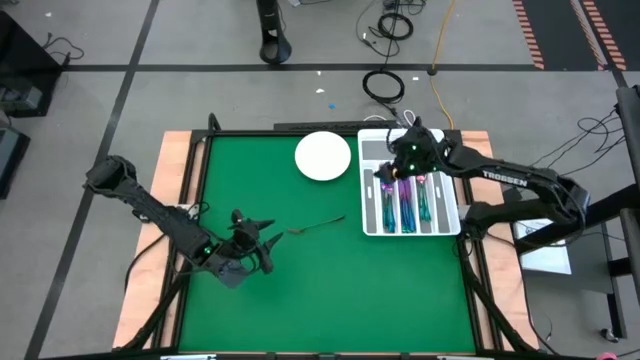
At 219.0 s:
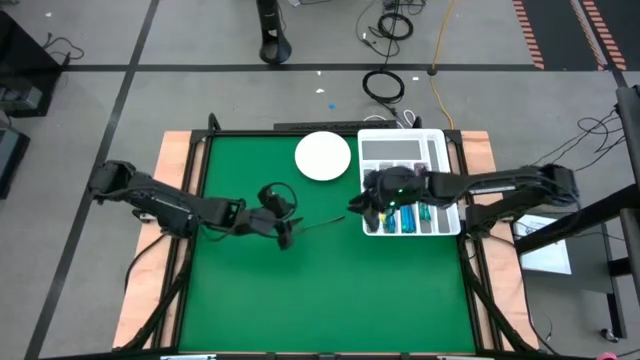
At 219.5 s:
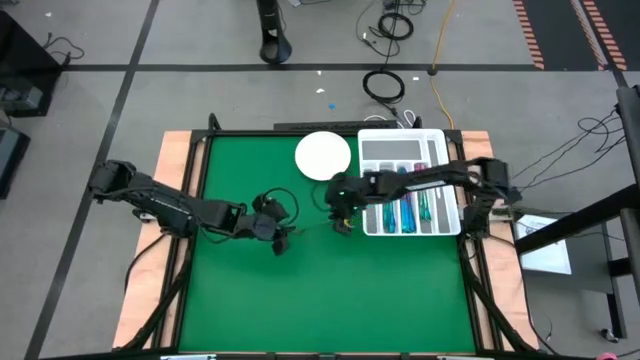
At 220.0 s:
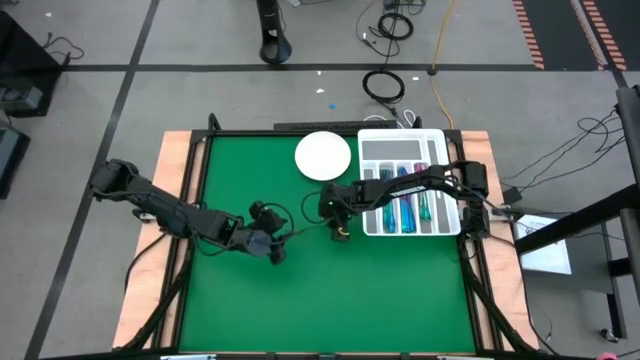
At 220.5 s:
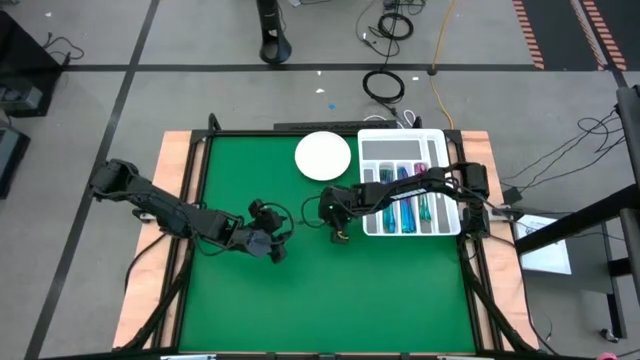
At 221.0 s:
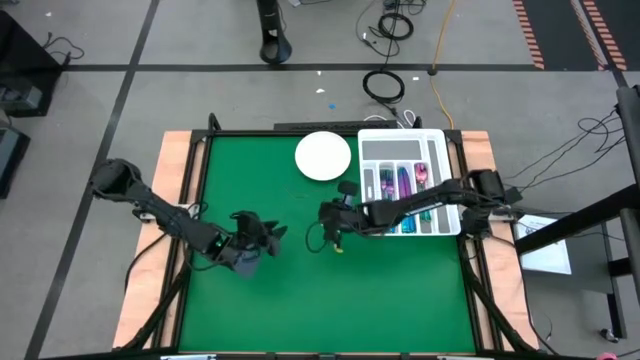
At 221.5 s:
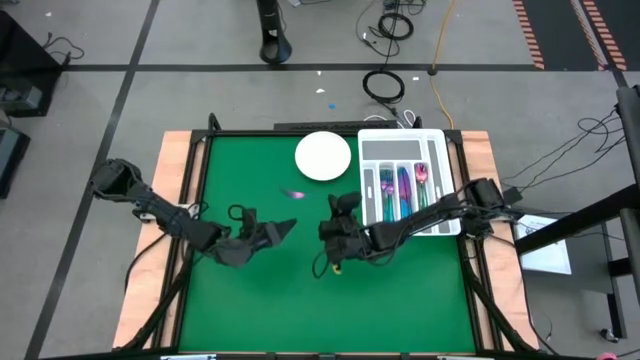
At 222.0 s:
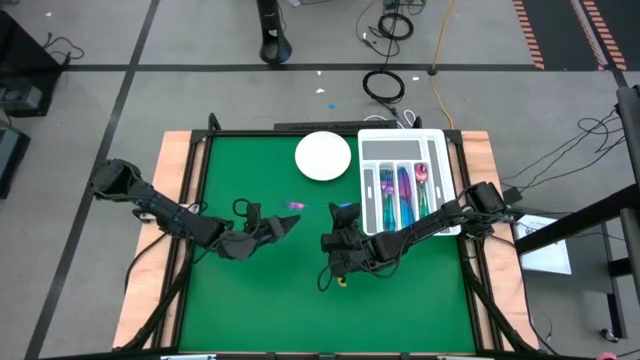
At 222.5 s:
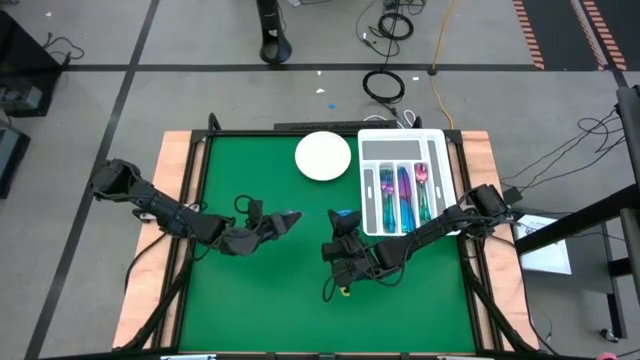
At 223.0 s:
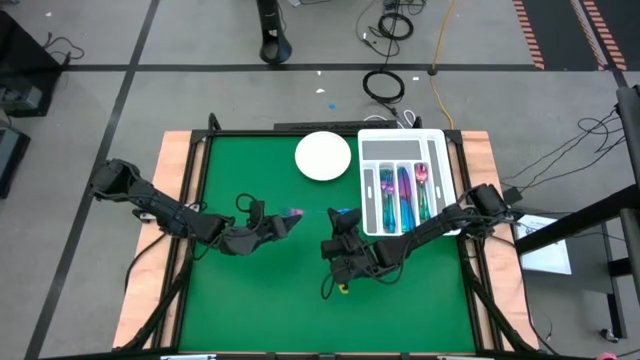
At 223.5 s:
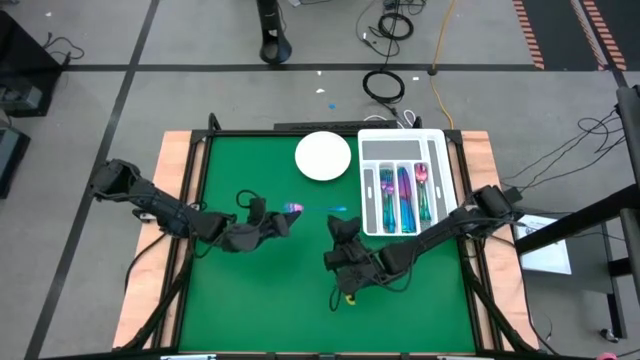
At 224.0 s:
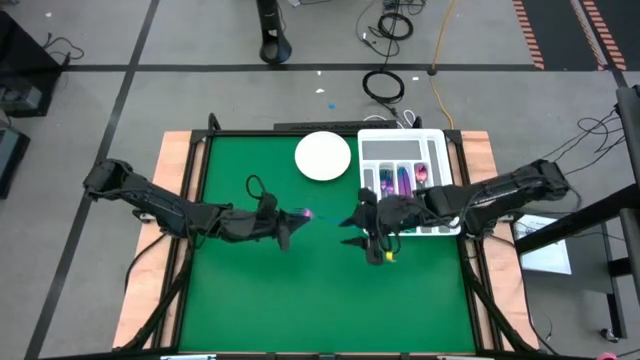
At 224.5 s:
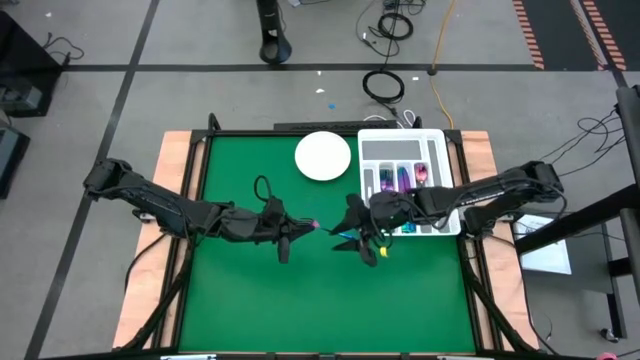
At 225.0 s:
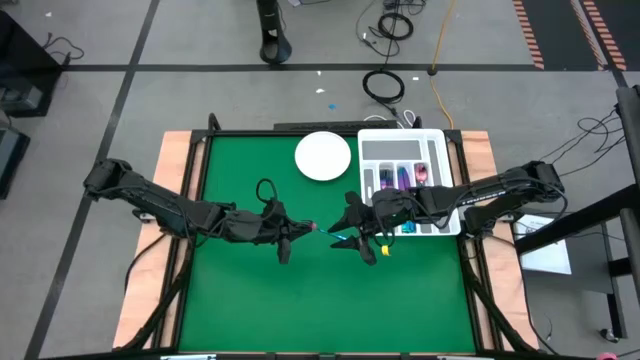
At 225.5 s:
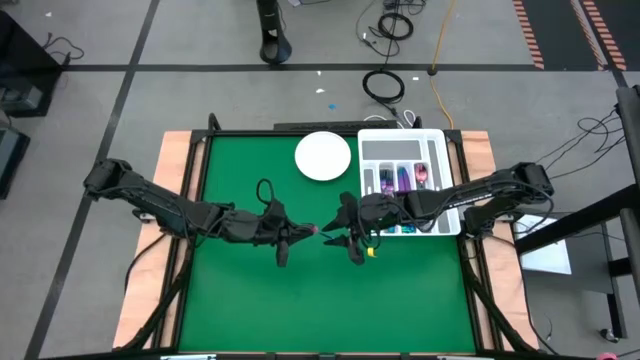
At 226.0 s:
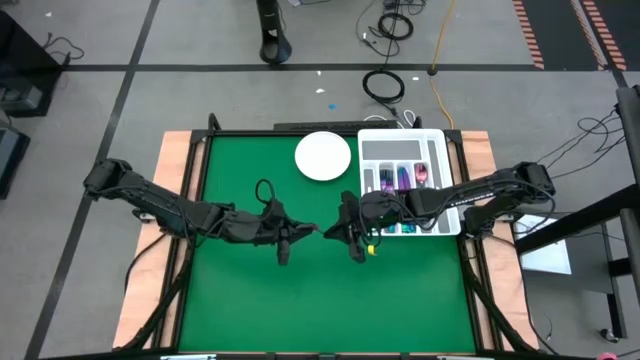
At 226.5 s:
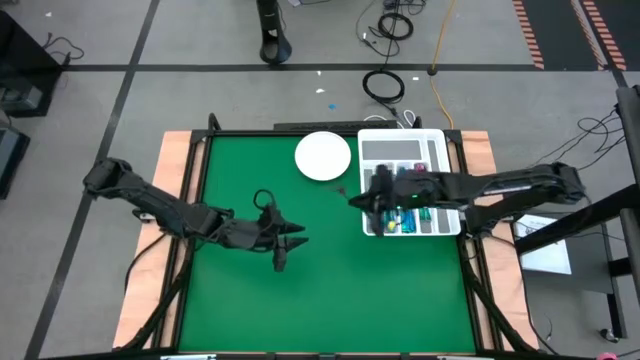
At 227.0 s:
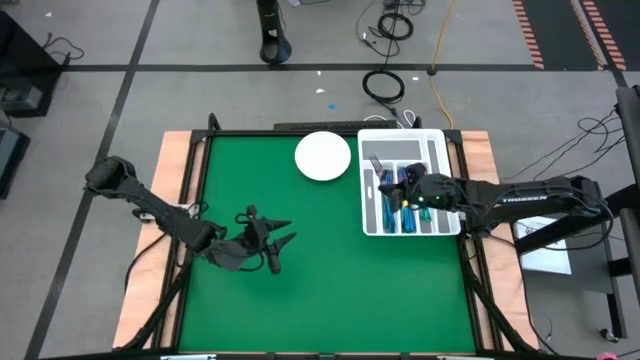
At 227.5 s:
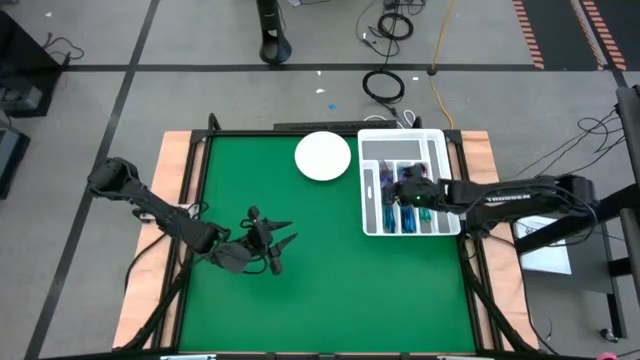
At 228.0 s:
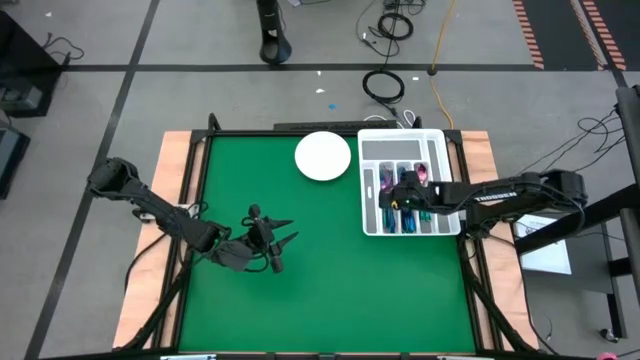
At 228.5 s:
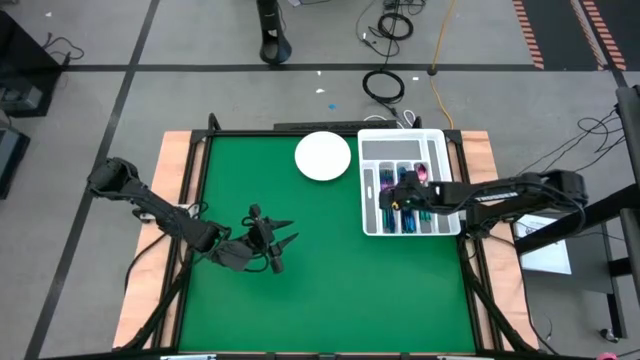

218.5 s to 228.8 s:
Task: Sort silverware
Put the iridescent fork into the white silverware tray

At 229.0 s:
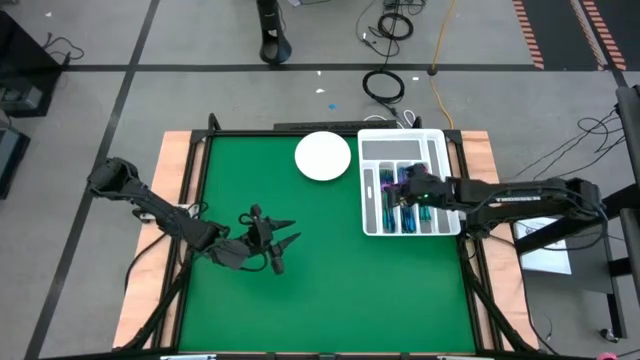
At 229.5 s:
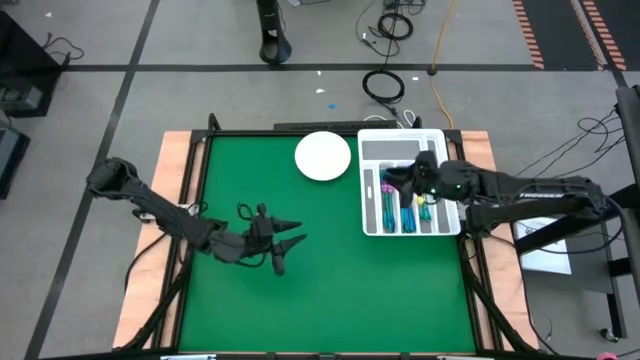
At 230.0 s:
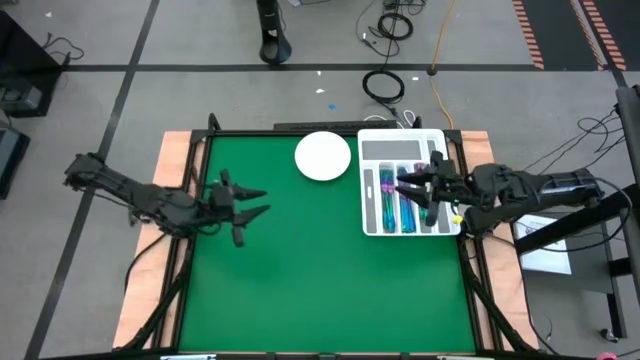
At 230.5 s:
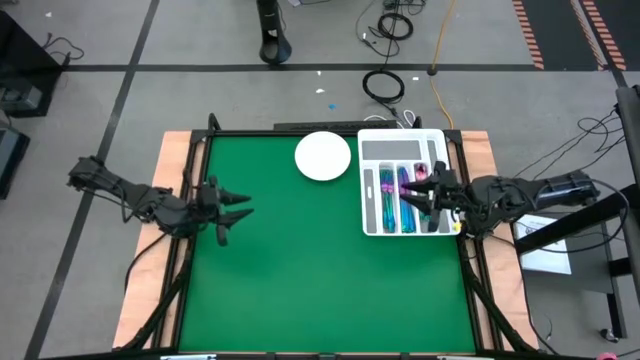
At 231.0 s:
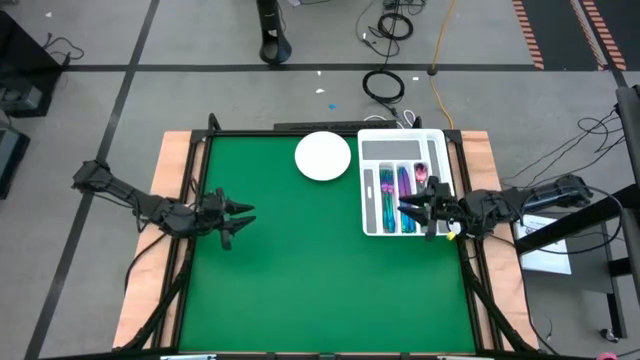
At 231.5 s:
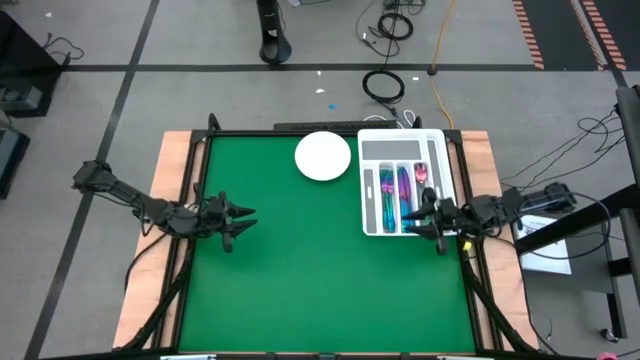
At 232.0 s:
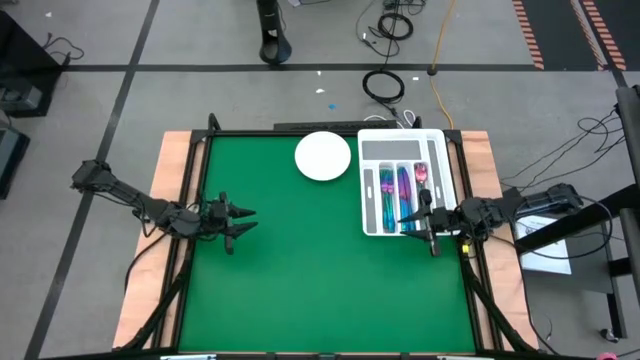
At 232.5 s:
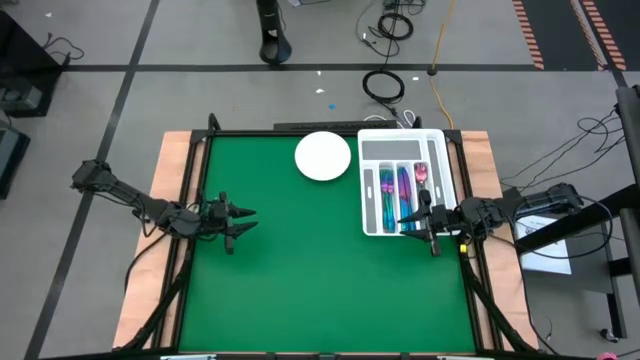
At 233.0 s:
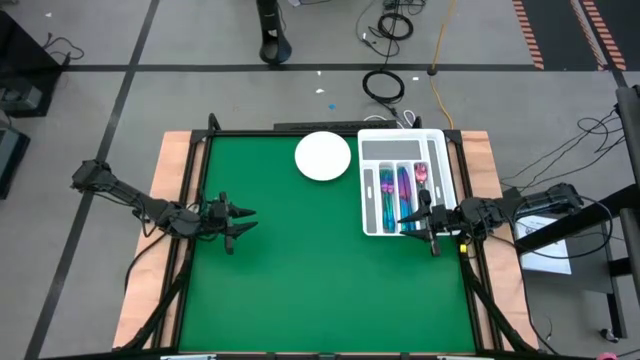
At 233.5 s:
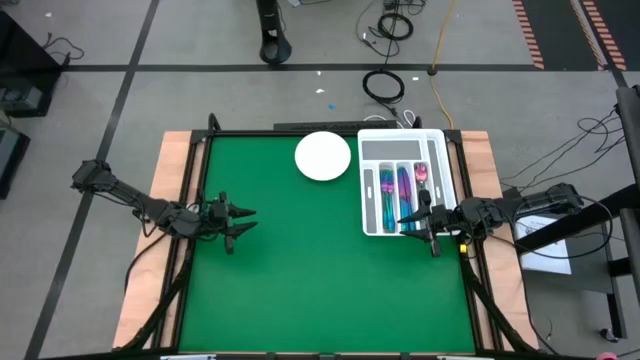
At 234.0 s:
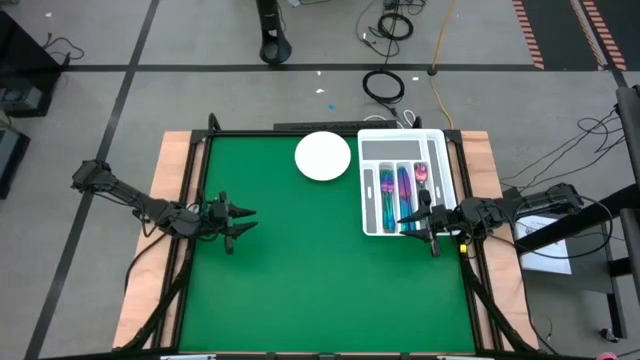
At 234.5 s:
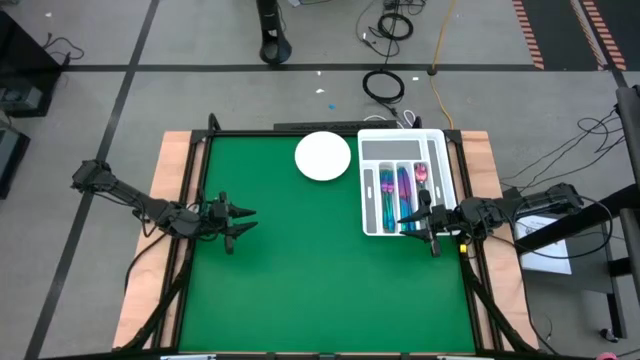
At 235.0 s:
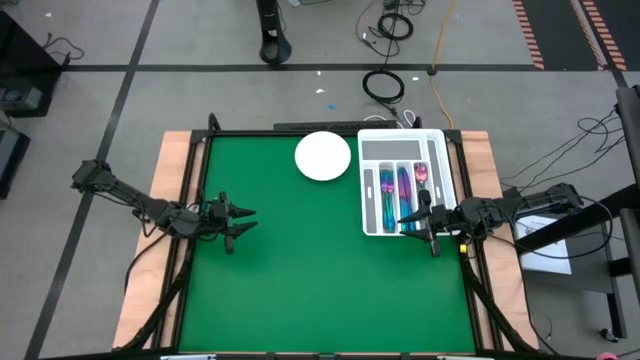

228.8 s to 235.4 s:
Return to Home Position

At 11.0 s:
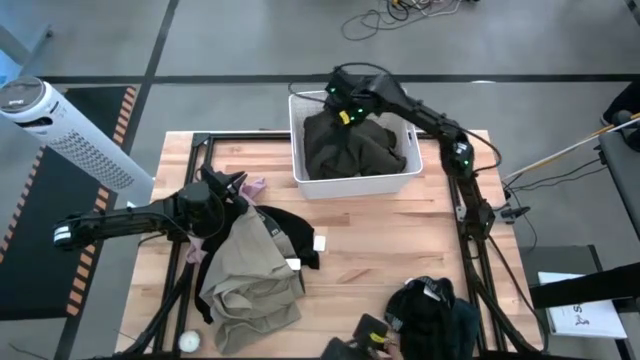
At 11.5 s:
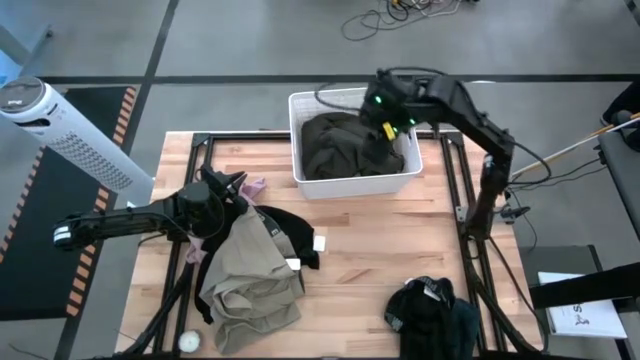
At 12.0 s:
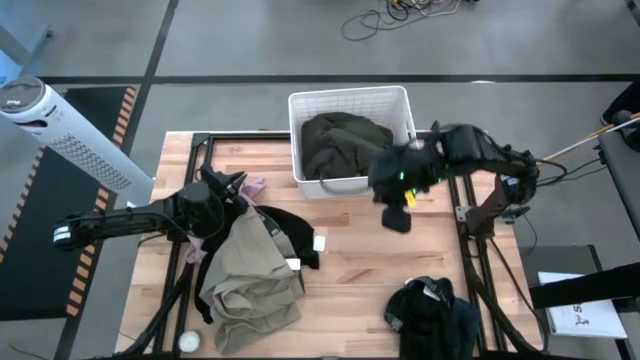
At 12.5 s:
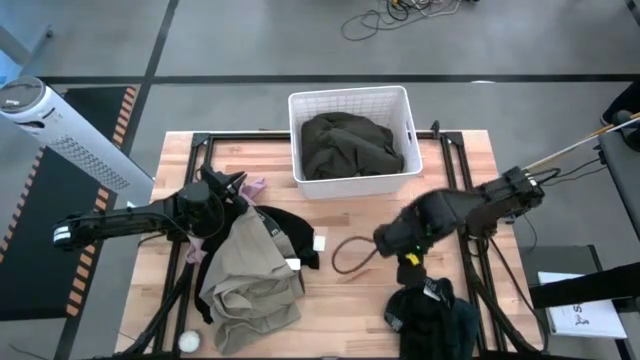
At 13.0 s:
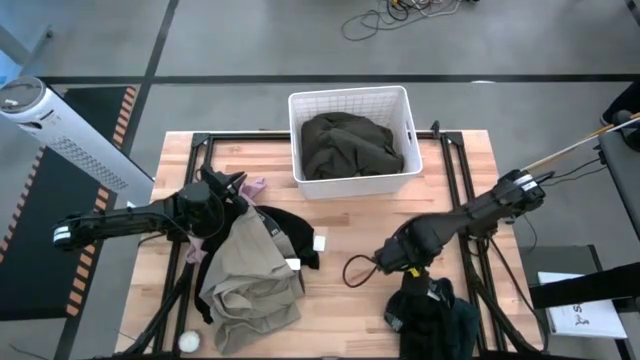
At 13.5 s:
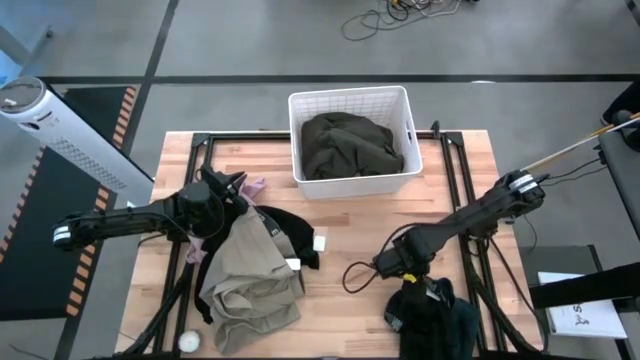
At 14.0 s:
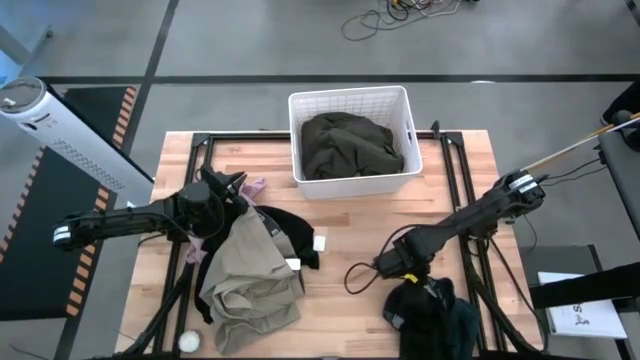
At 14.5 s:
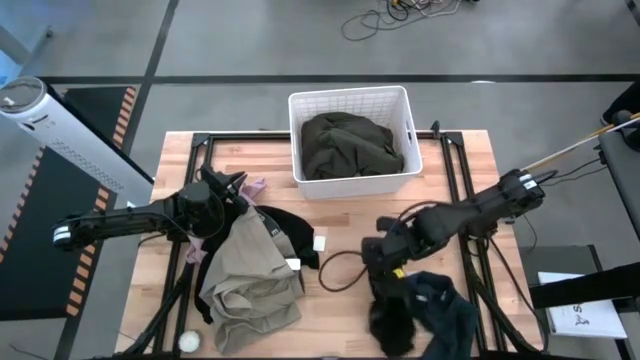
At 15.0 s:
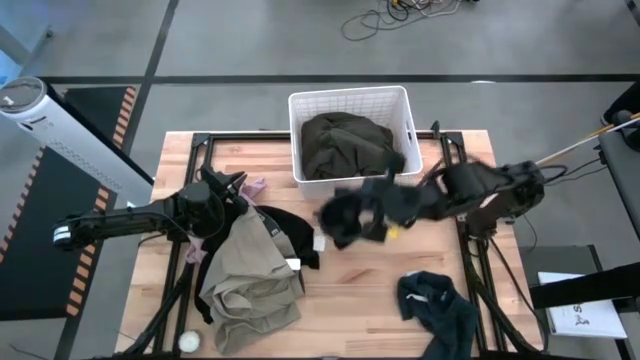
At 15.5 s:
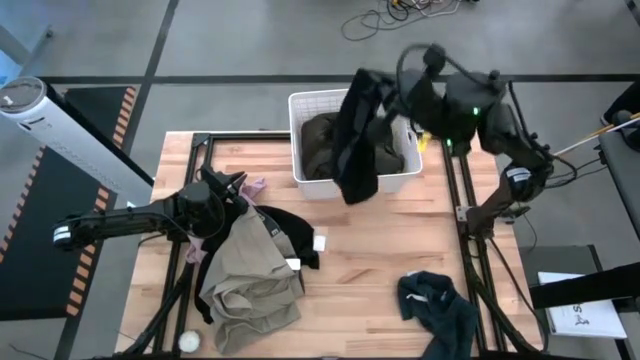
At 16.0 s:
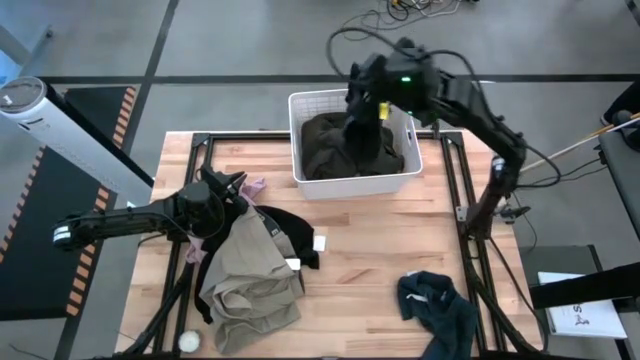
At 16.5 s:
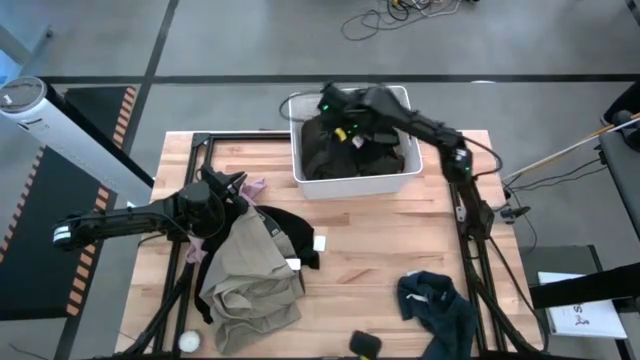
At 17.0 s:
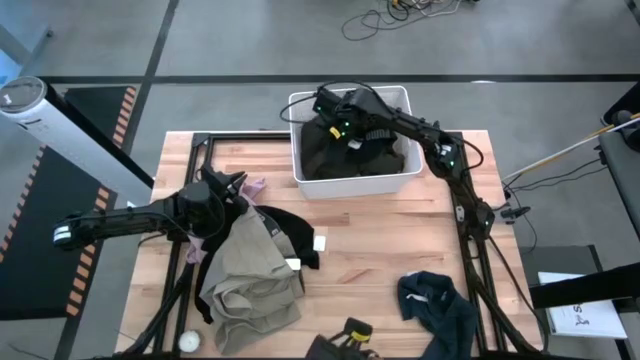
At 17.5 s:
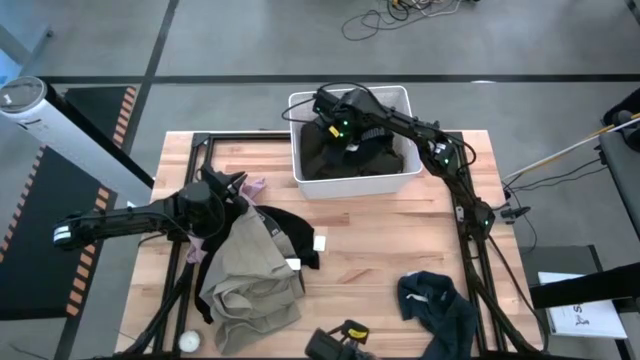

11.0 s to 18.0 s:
Task: Sort clothes
Put the black boxer into the white laundry bin
